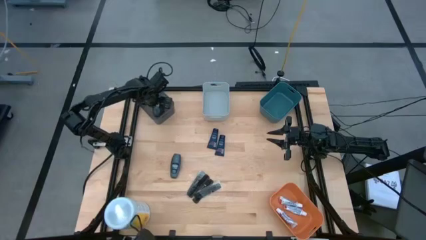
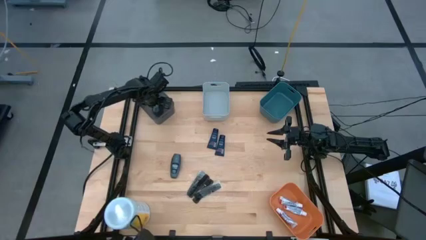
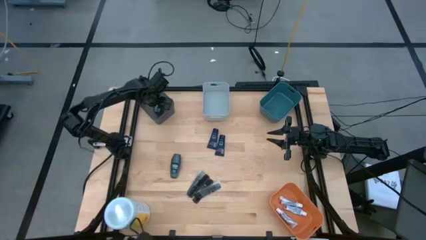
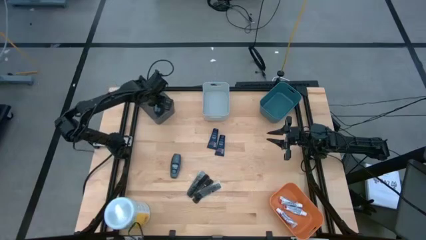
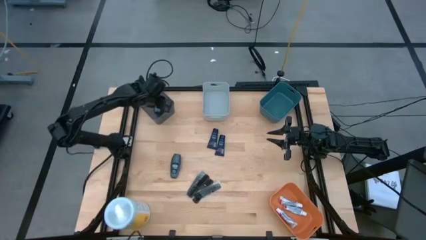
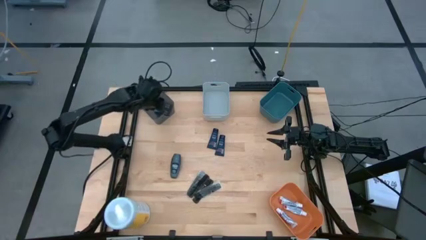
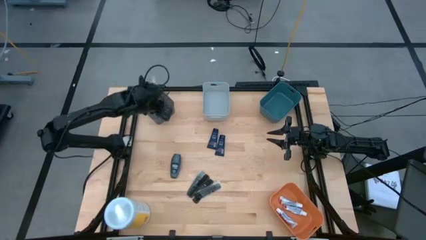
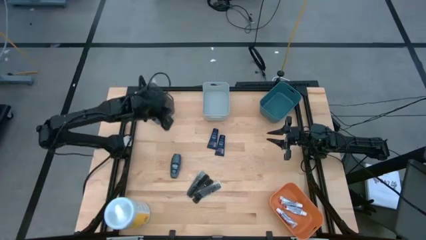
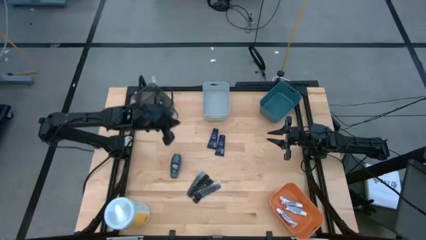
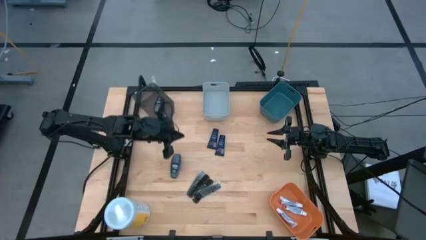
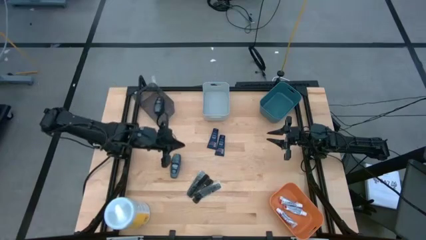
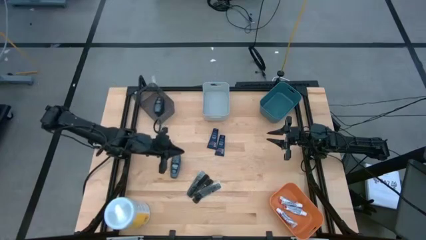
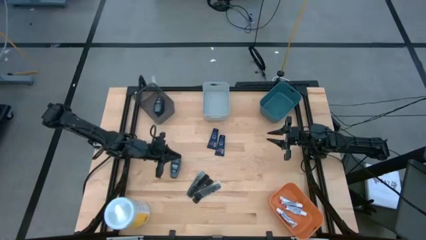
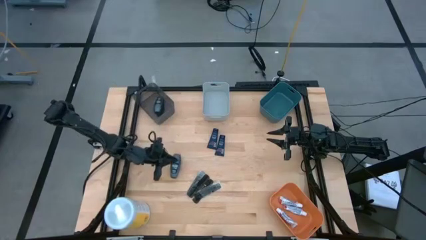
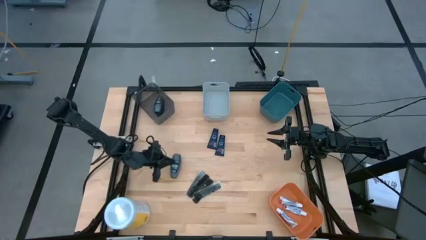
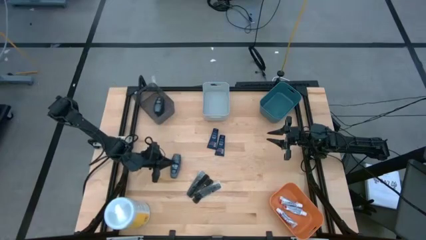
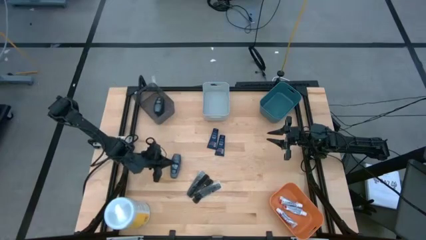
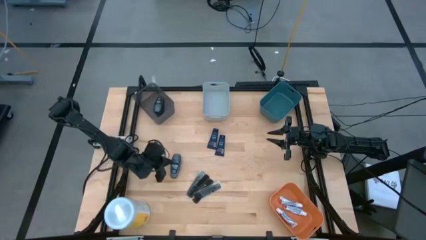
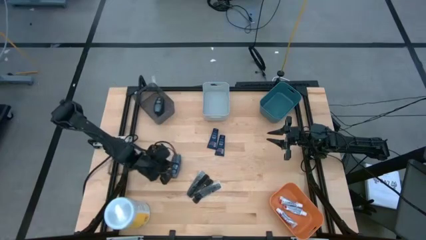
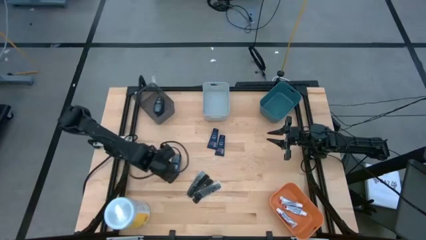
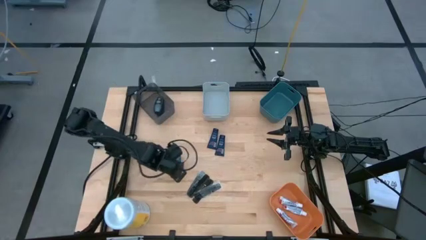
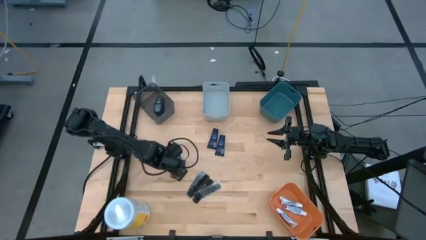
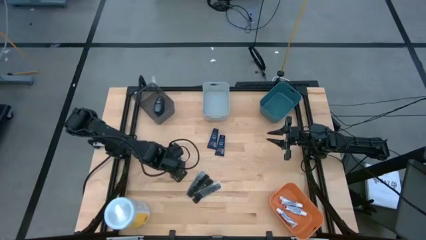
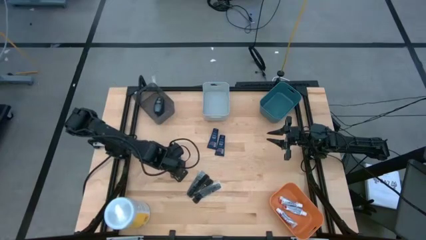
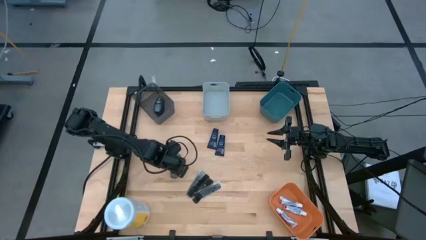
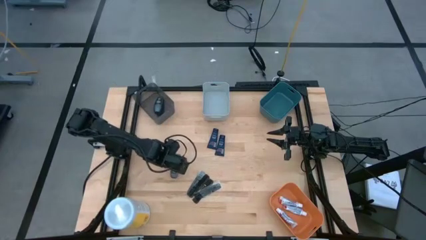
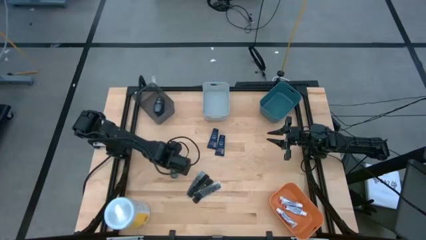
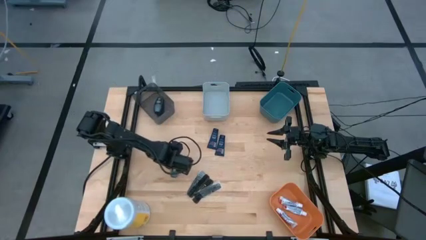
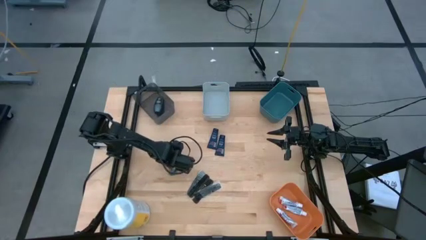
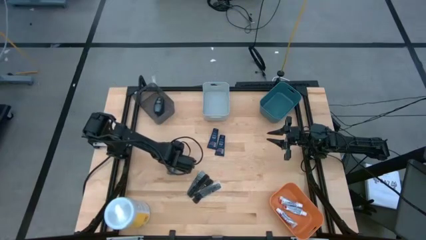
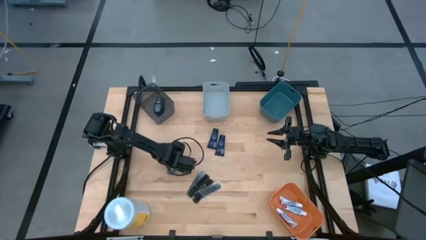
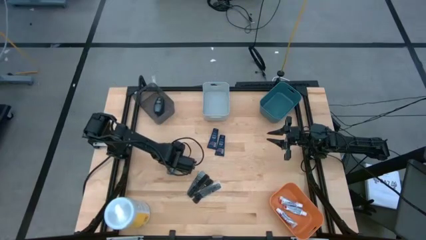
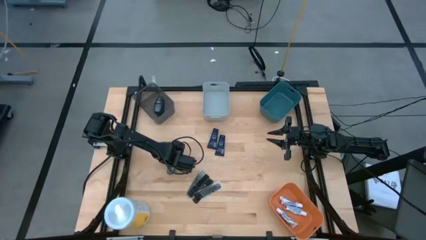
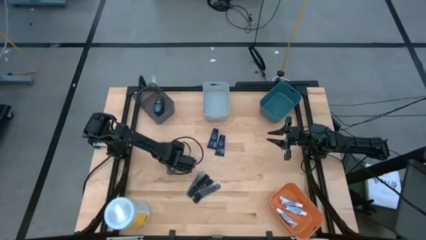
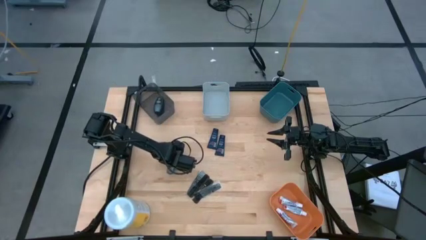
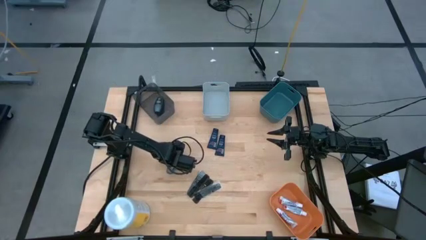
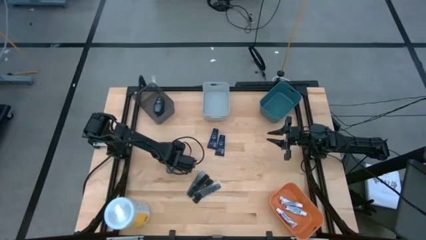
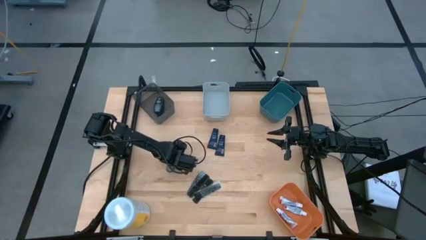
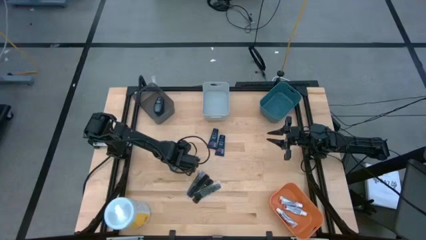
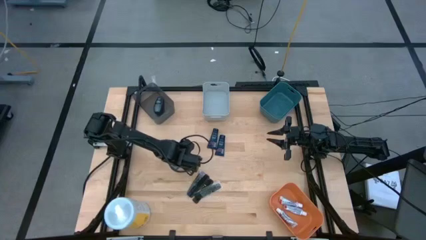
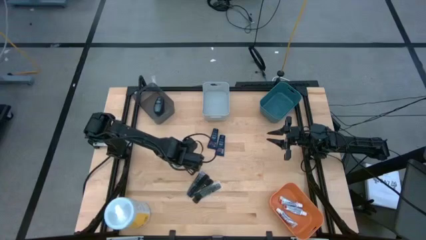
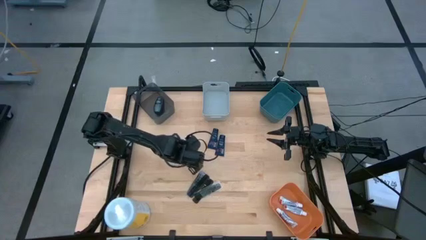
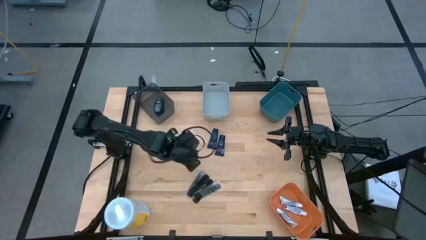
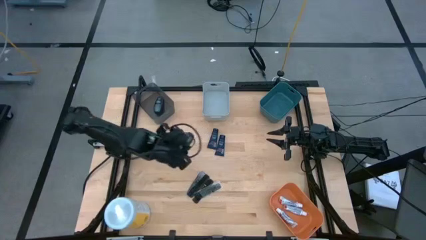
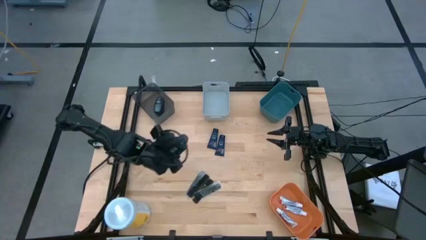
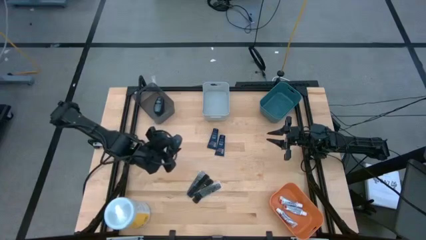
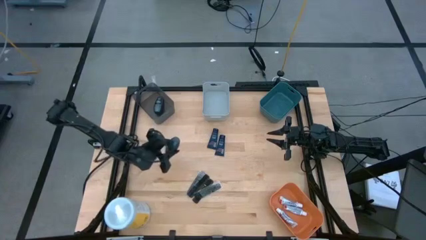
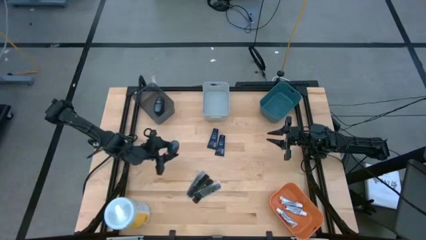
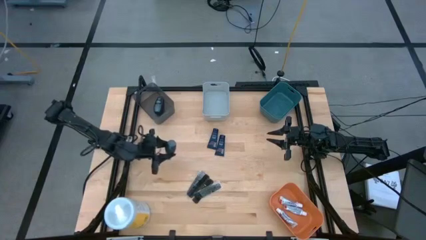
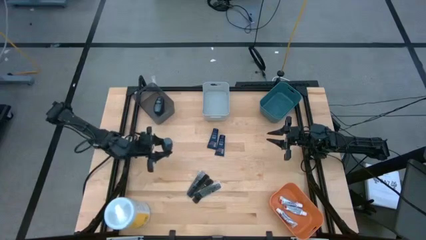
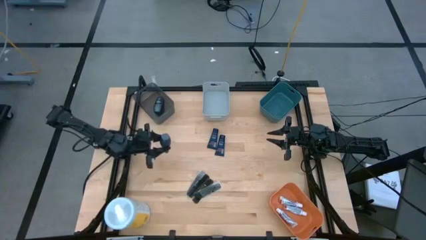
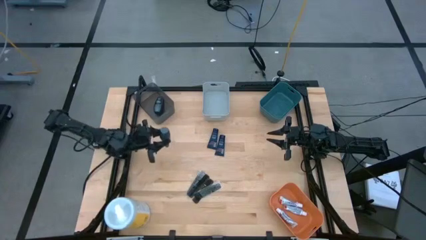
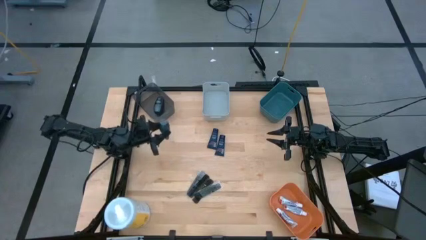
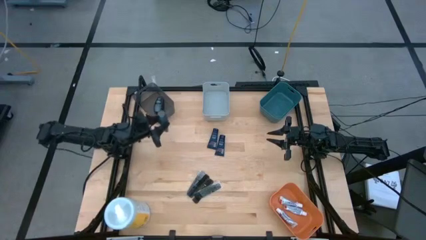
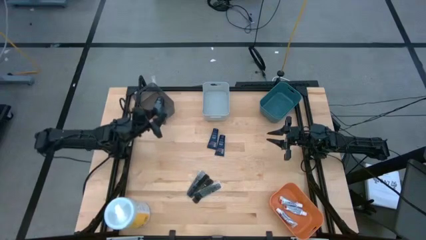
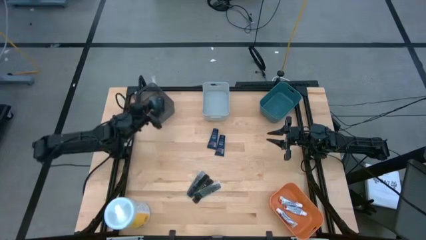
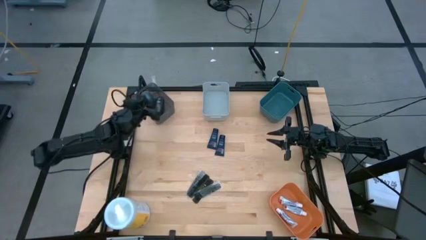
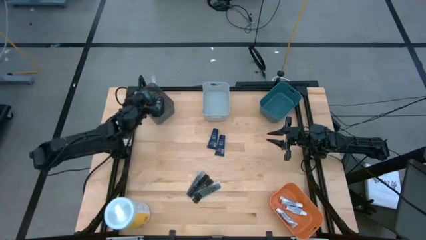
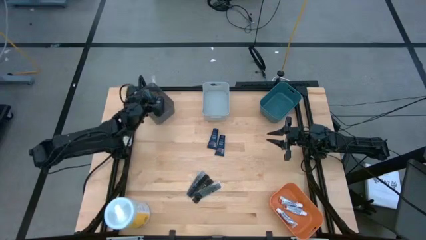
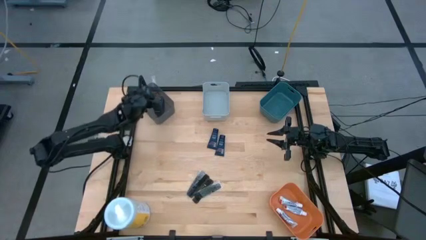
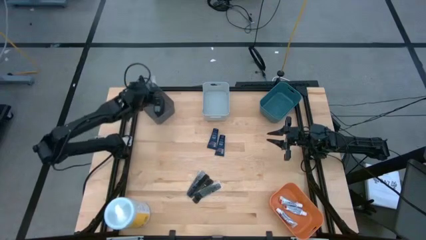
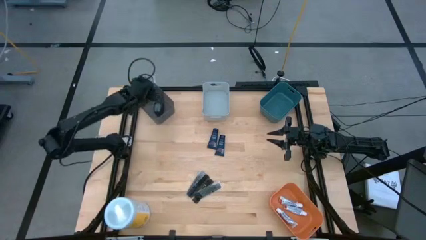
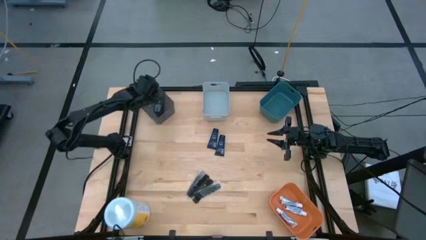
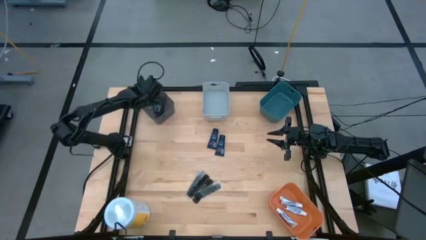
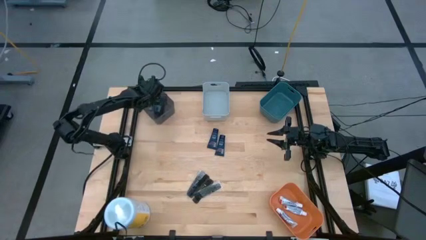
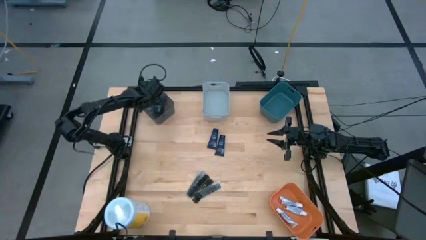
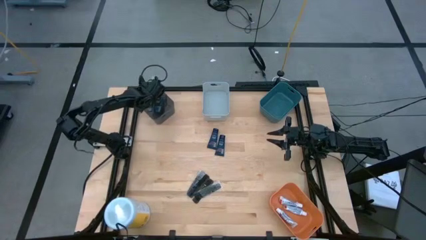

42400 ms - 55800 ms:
Task: Pick & Place Travel size toiletries
Put the gray deodorant into the black bin
